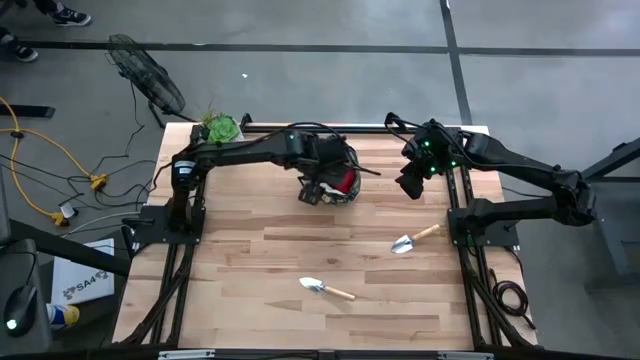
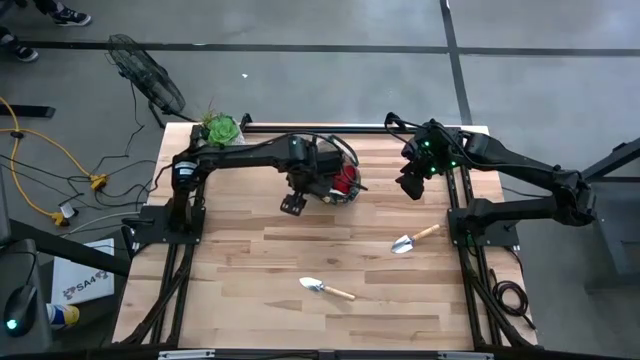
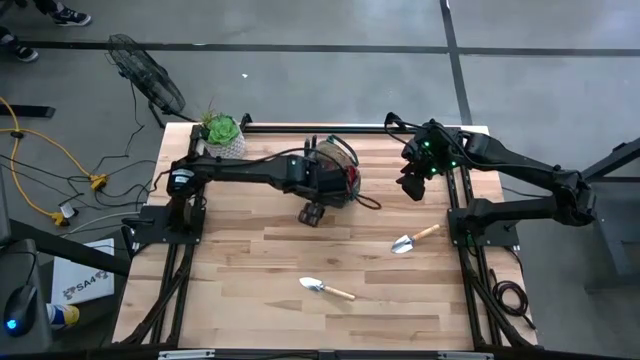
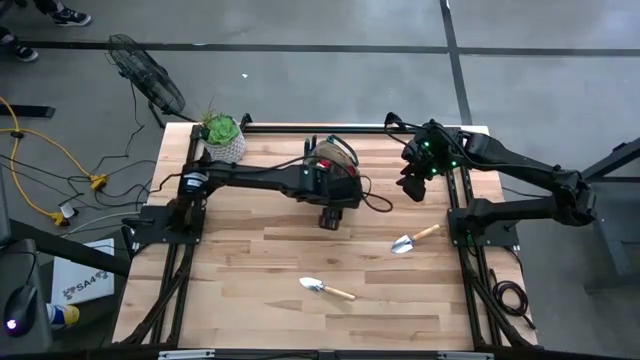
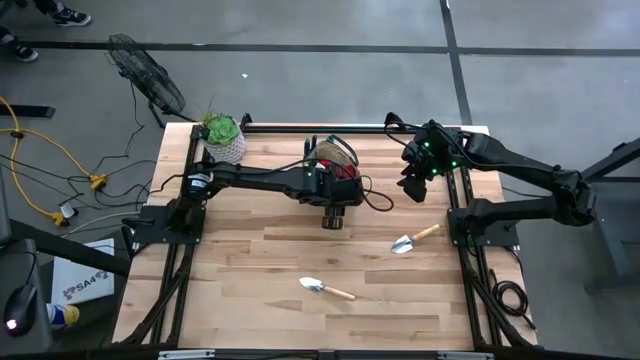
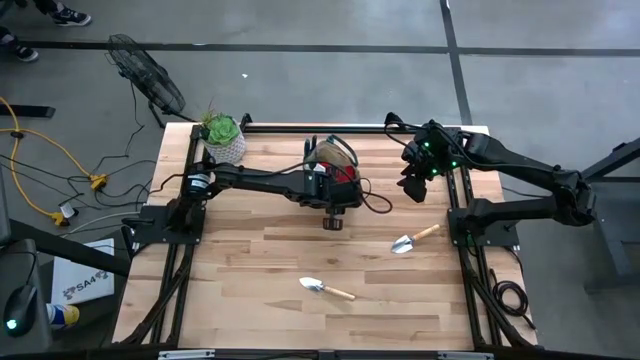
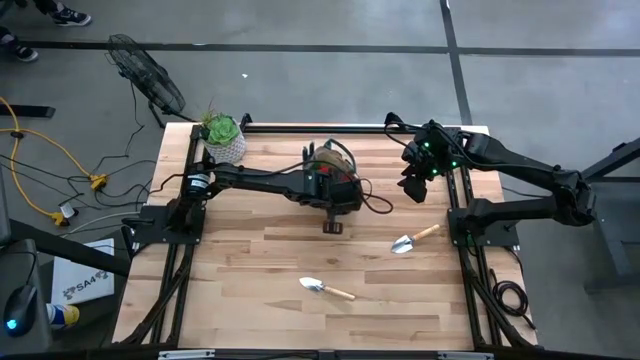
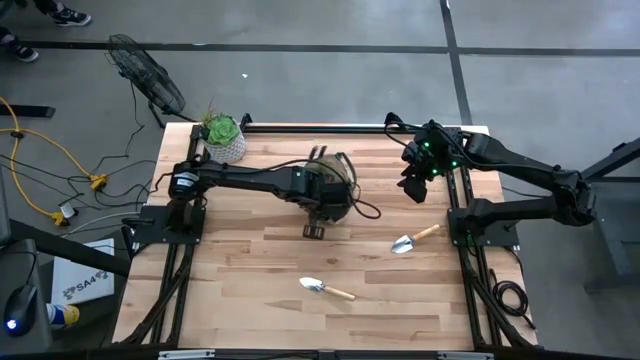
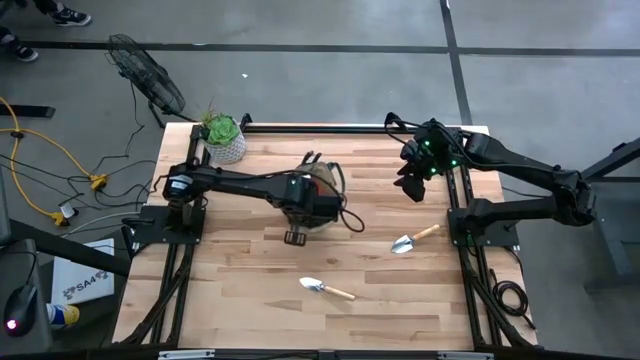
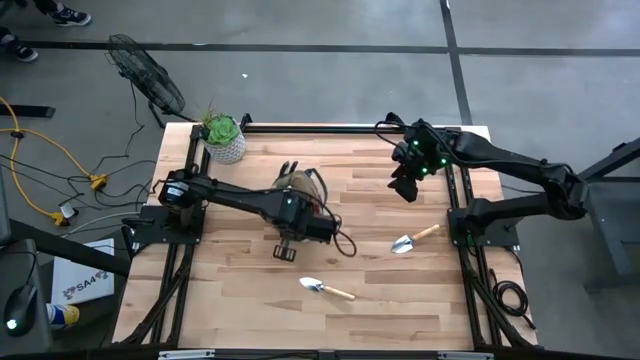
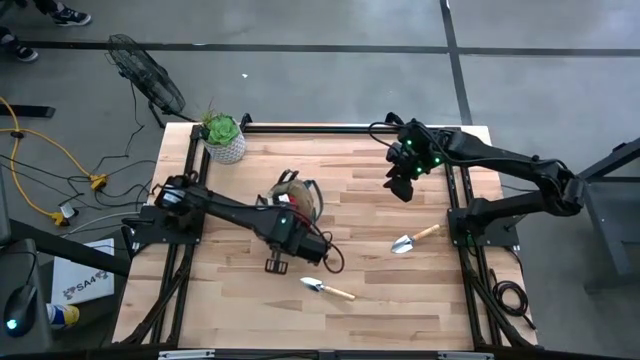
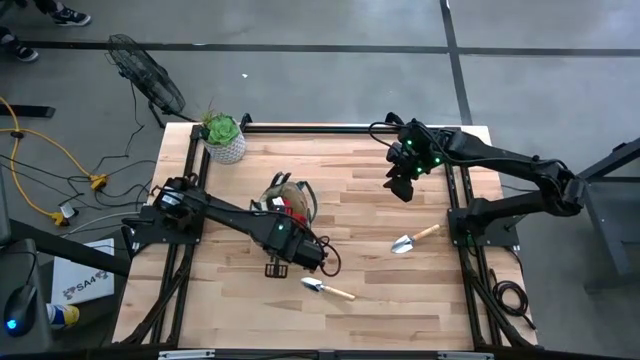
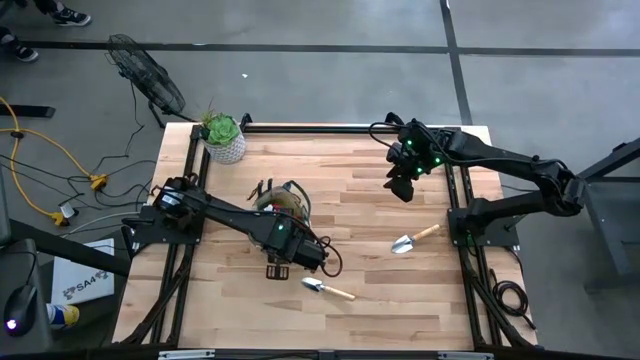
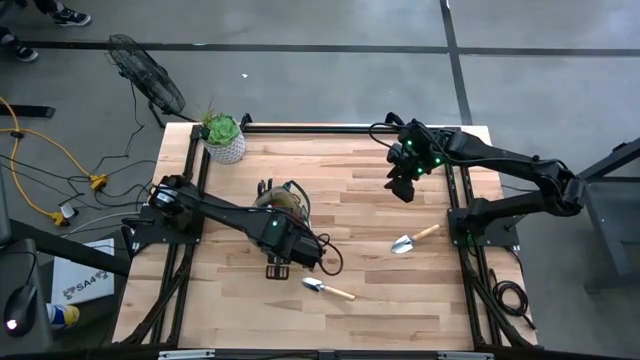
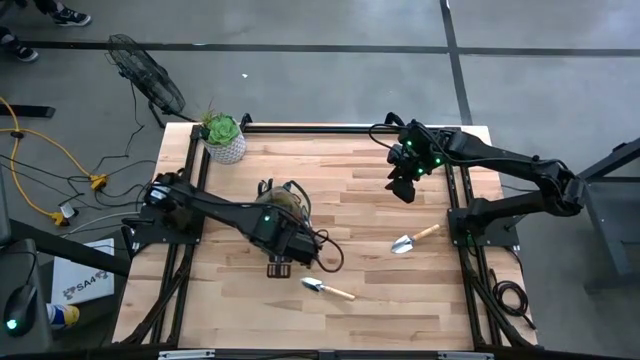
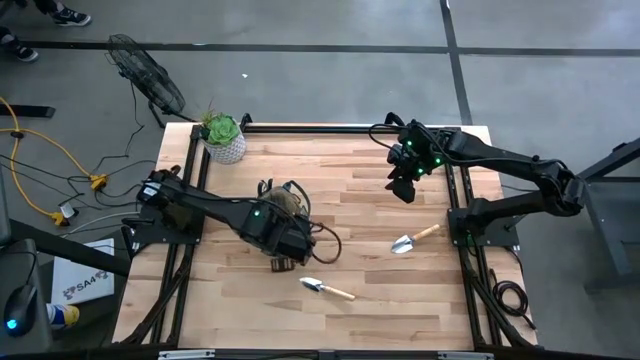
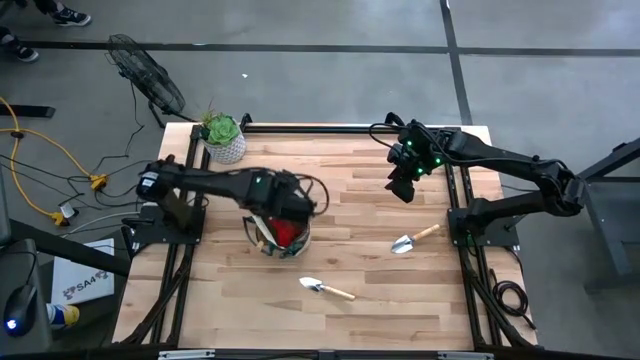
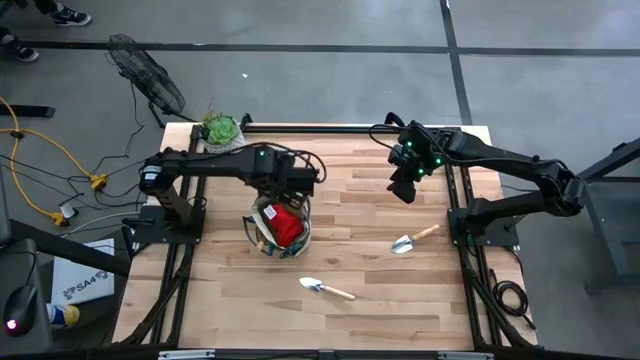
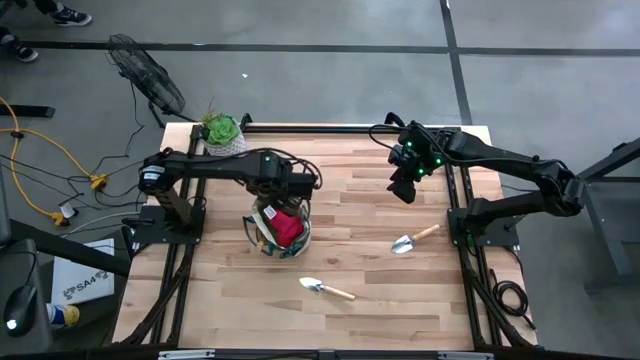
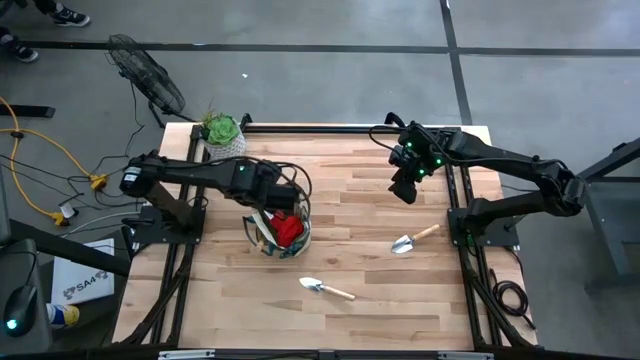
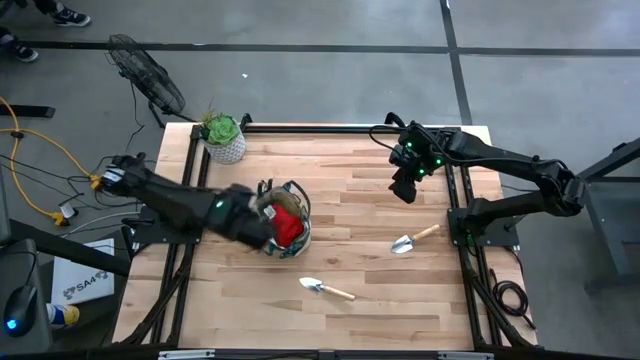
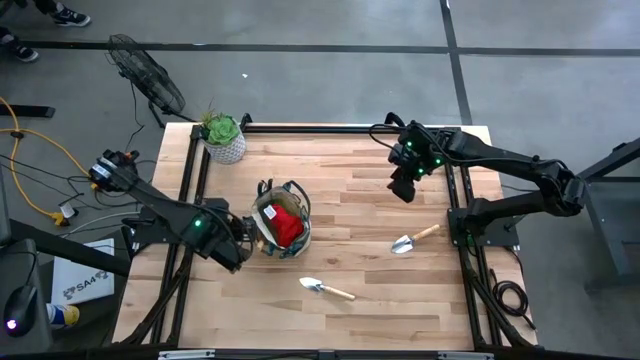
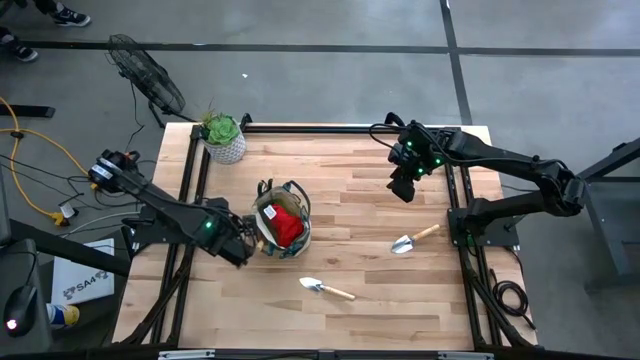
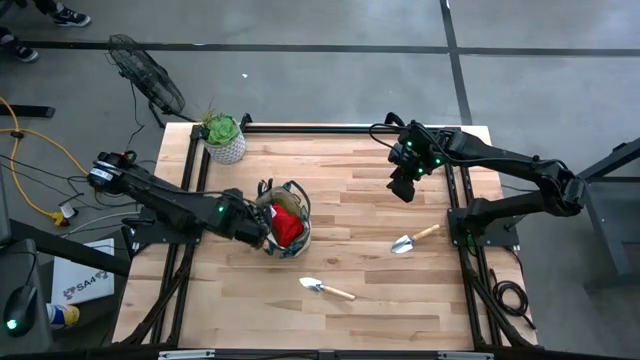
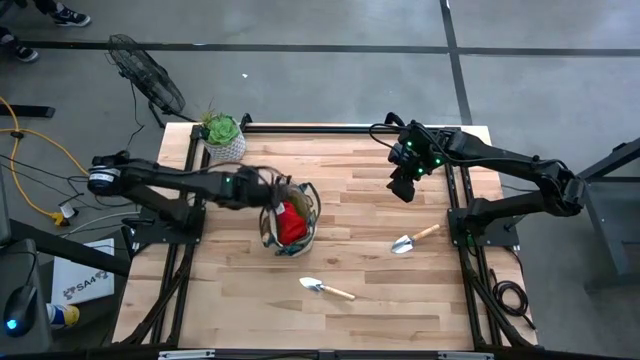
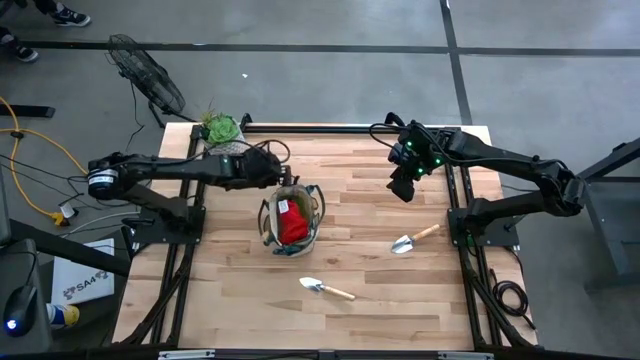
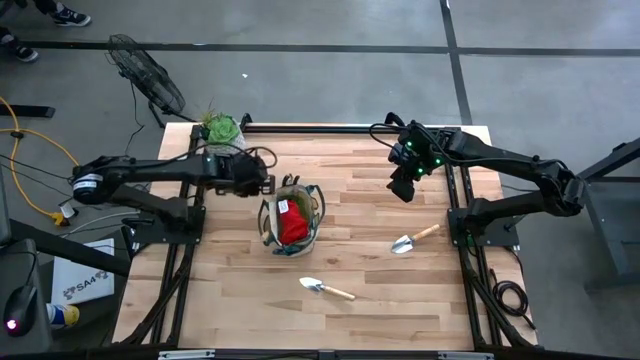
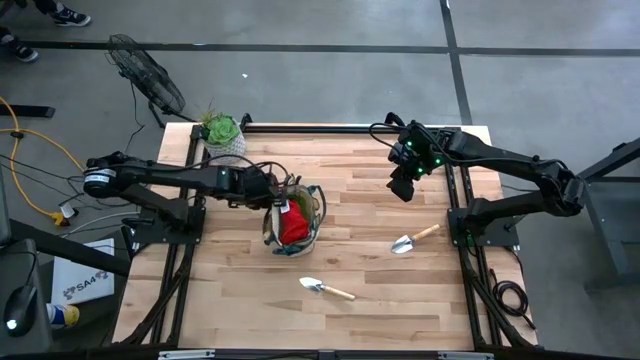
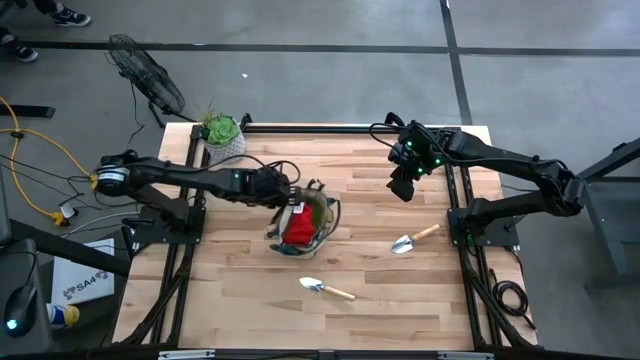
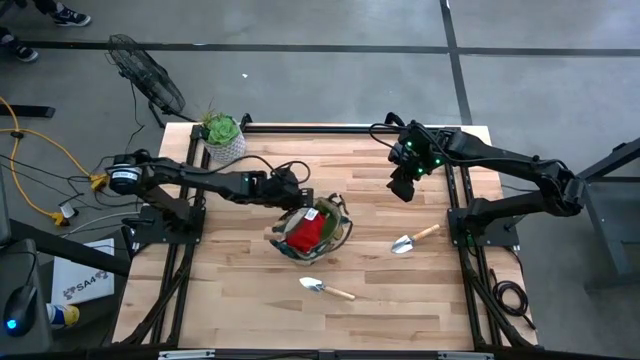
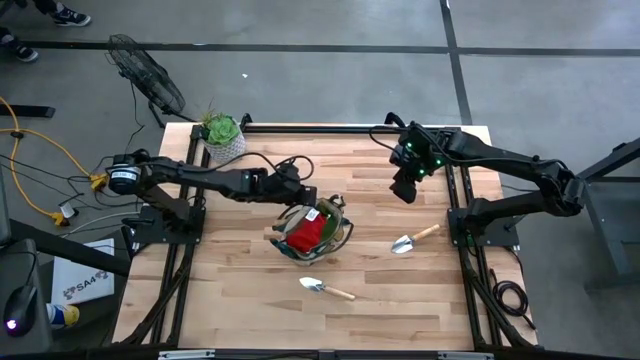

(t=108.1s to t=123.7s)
Task: Pick & Place Garden tools in Gardening bag
Move the gardening bag to the center of the table
